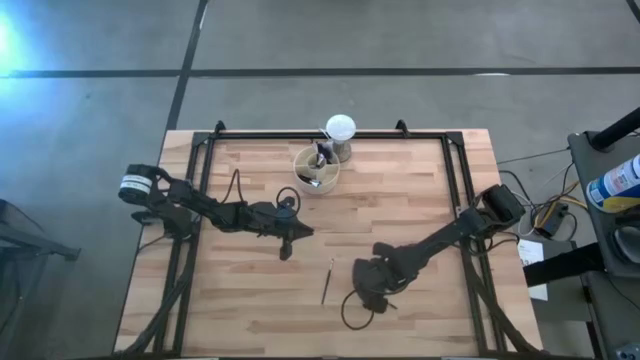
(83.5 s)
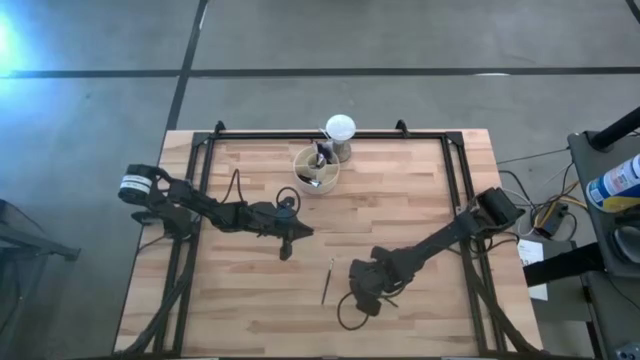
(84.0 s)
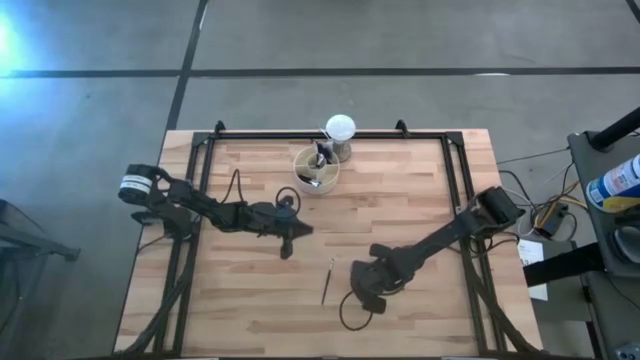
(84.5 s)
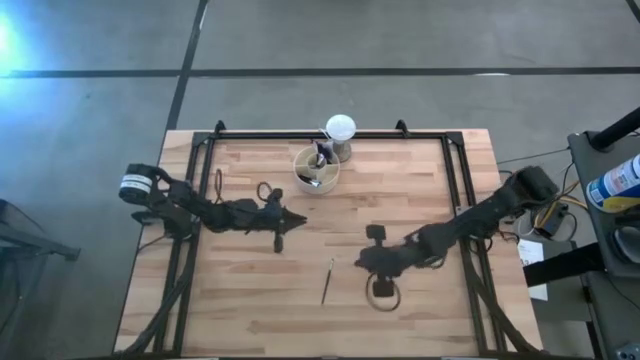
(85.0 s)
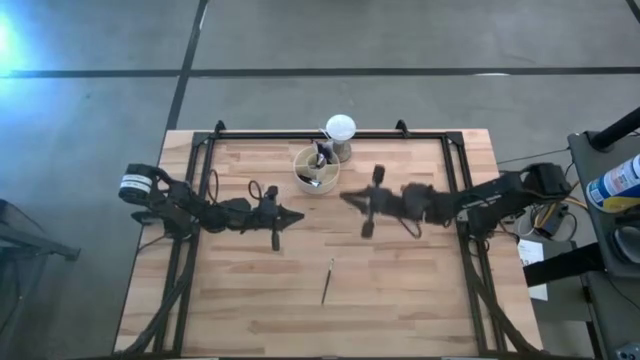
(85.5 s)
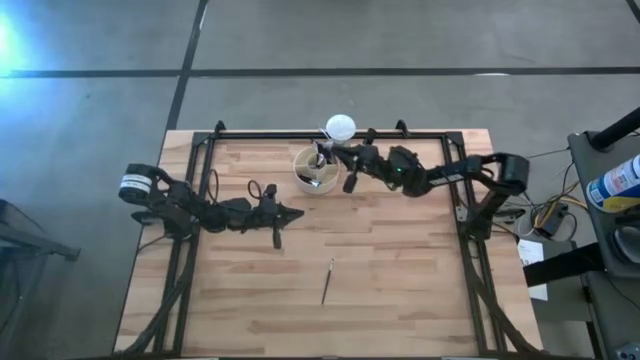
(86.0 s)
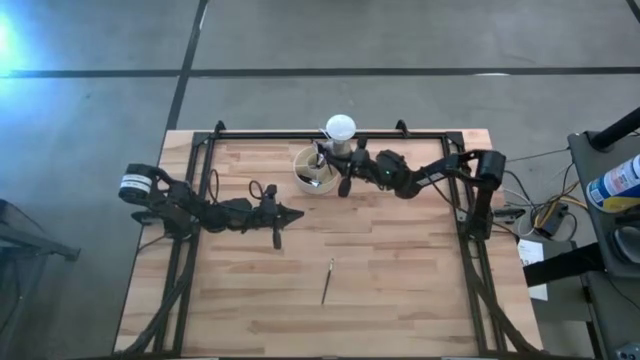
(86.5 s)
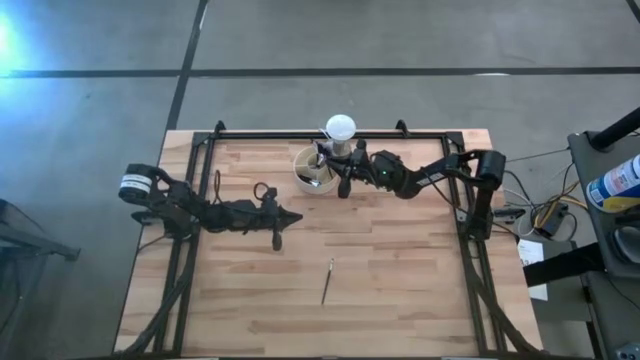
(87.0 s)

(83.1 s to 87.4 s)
Task: Put items in baskets/containers
Put the black liner brush into the white organizer

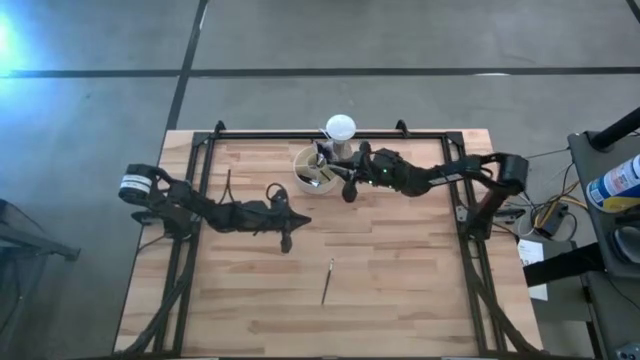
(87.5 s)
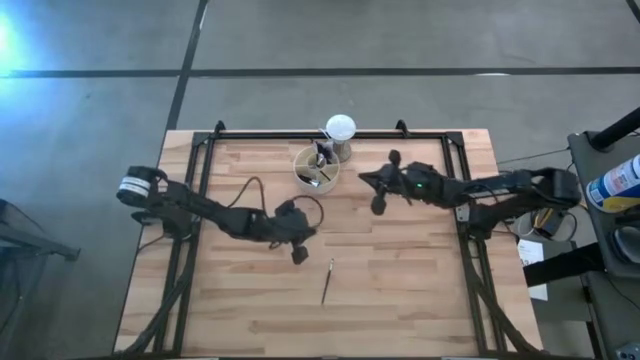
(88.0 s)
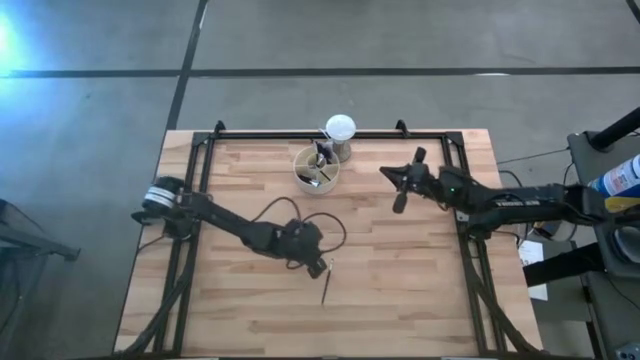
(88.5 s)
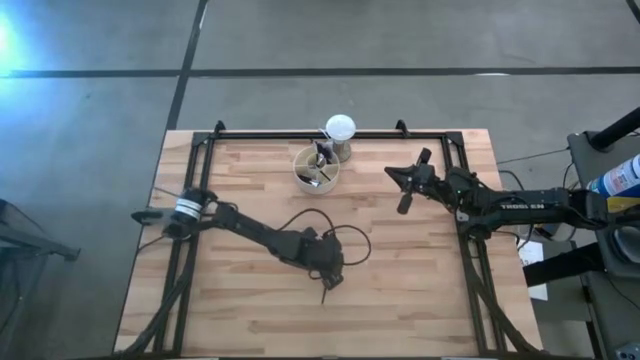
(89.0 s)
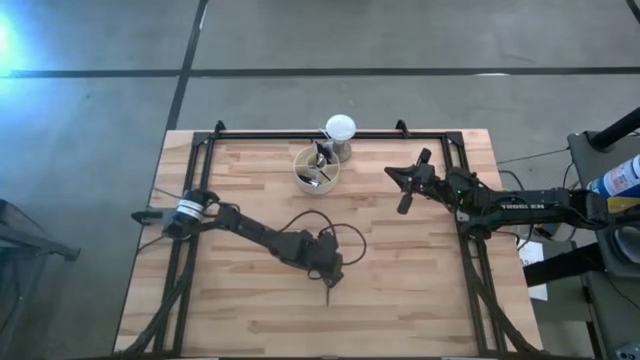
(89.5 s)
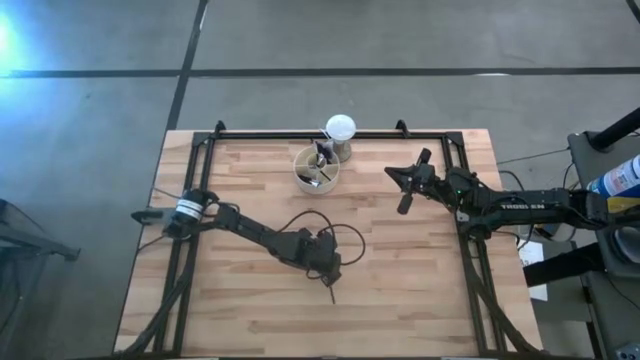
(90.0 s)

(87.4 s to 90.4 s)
Put the black eyeshadow brush into the white organizer

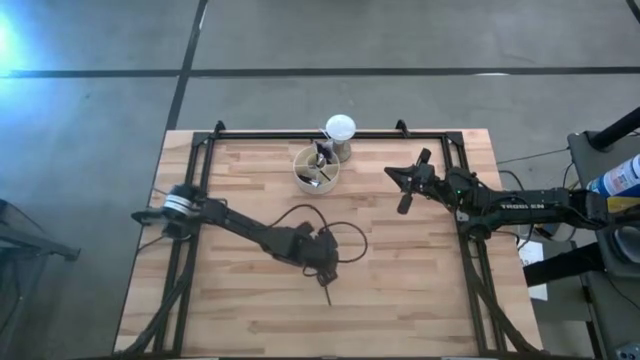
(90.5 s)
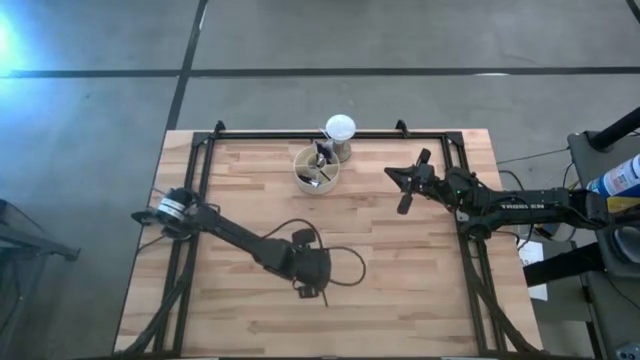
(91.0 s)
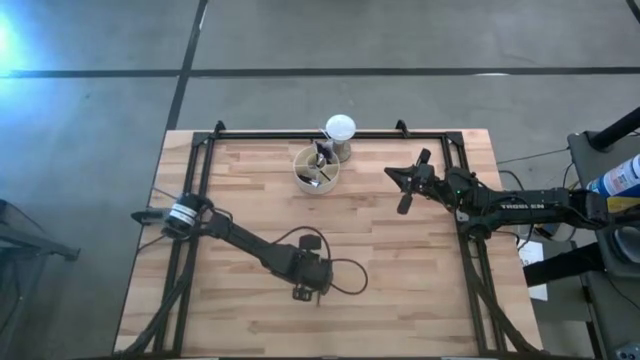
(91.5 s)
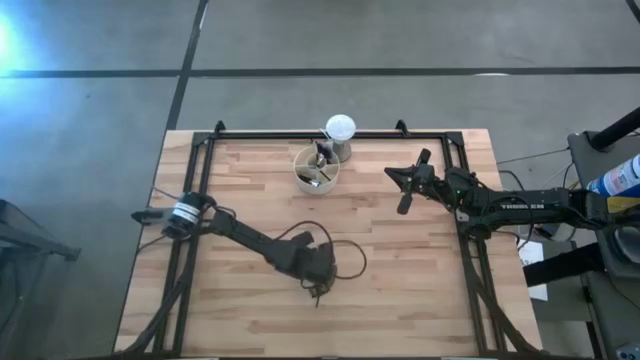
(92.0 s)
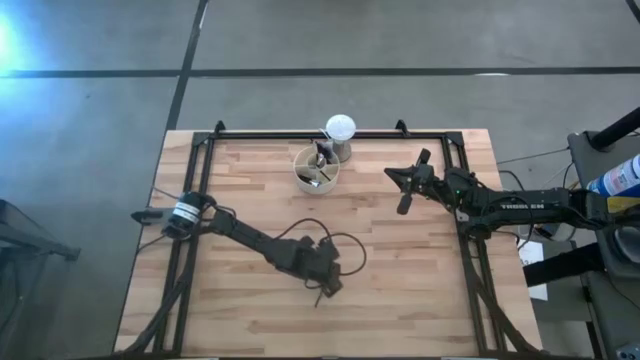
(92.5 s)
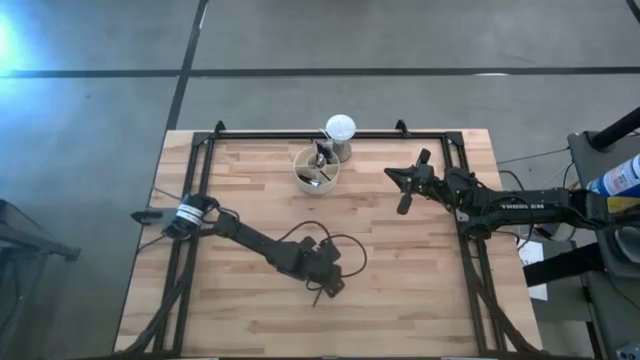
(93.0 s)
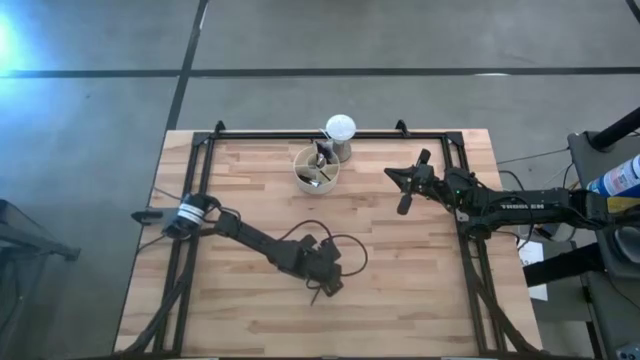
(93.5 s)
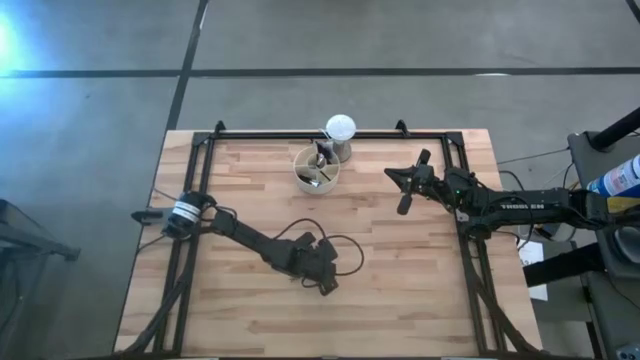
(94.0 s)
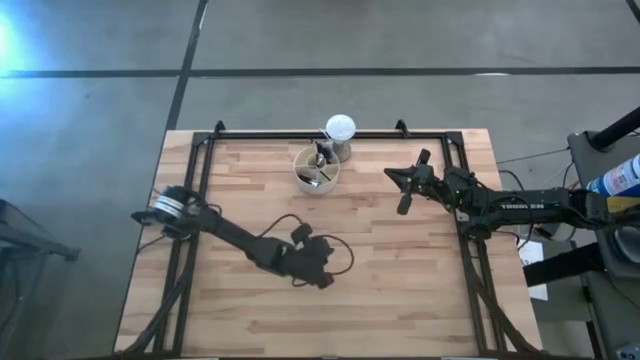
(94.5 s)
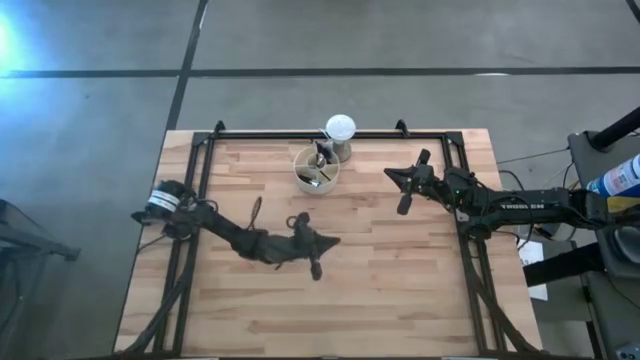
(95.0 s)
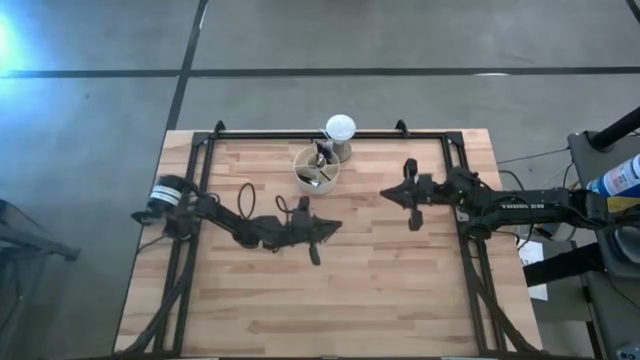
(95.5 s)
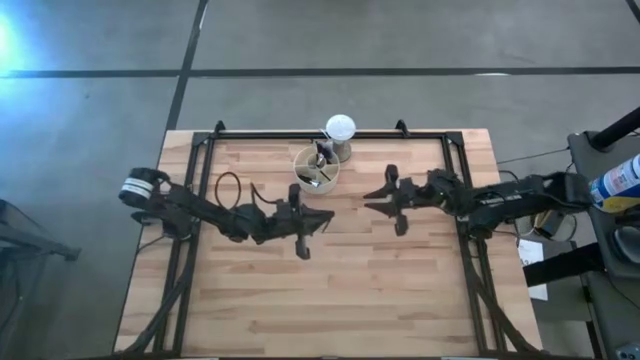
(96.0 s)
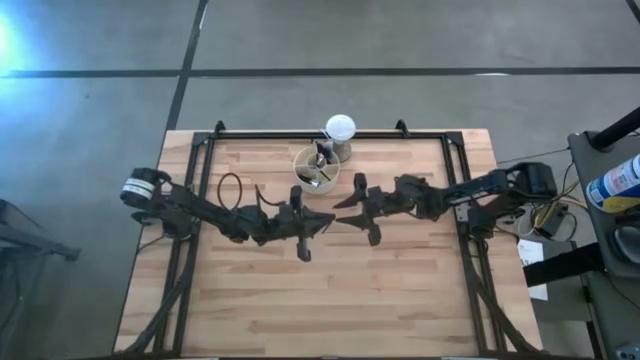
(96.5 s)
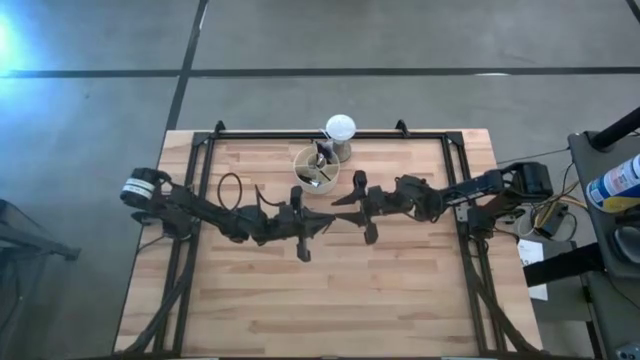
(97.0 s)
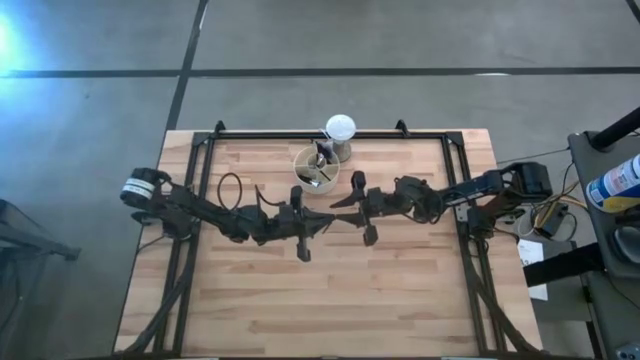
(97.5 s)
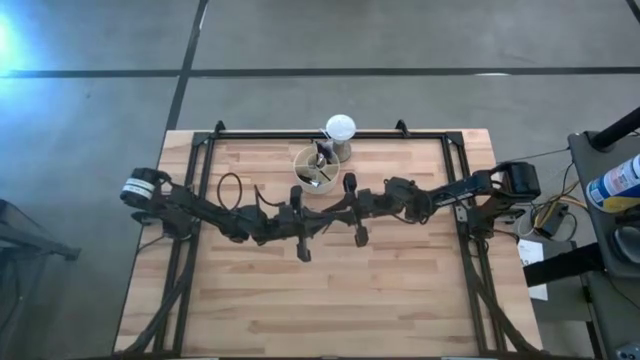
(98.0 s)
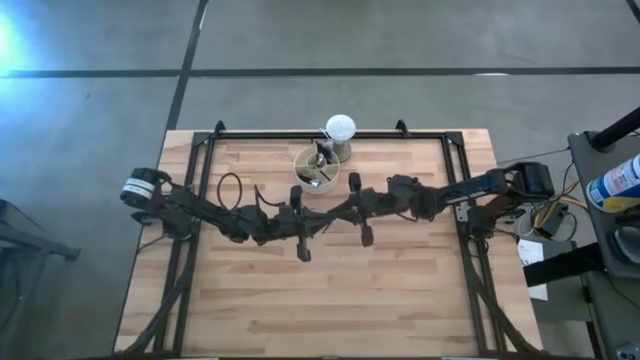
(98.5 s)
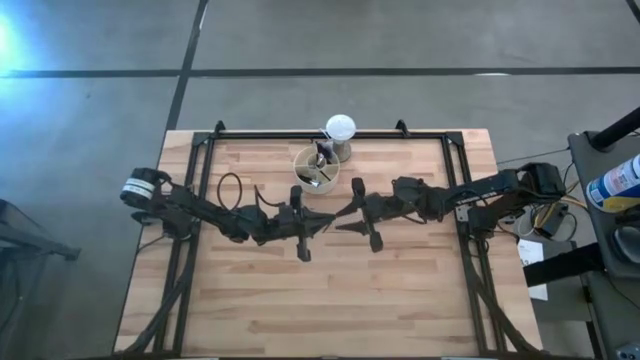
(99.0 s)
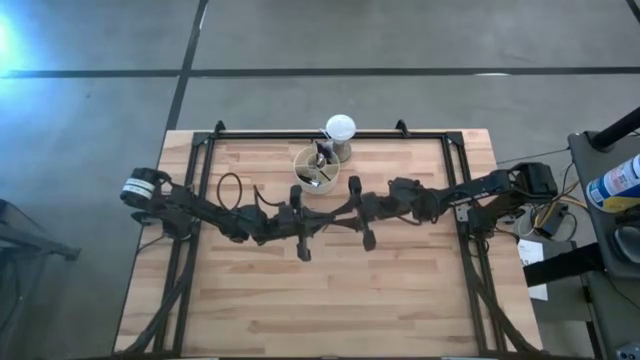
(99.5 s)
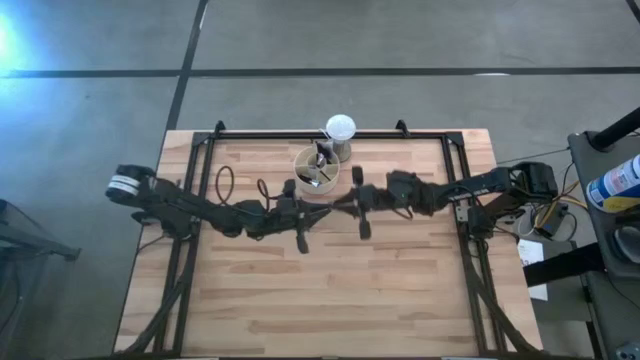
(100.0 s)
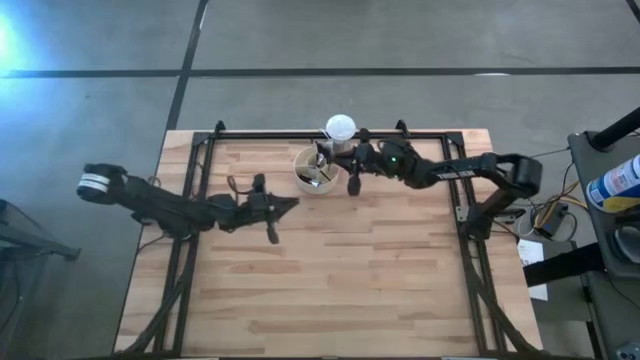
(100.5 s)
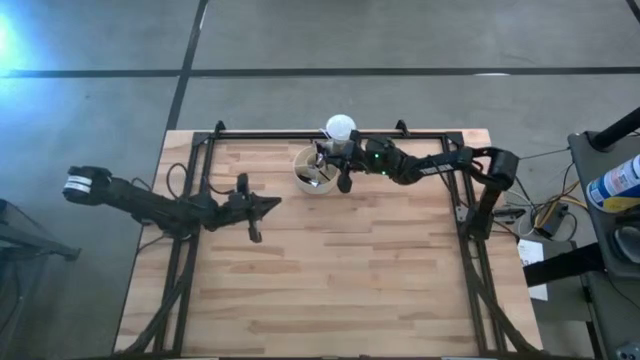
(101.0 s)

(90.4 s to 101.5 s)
Put the black eyeshadow brush into the white organizer

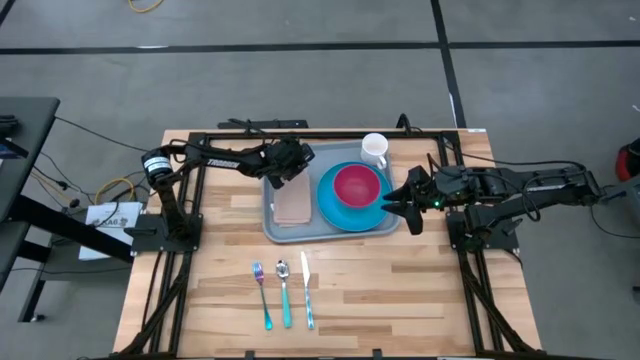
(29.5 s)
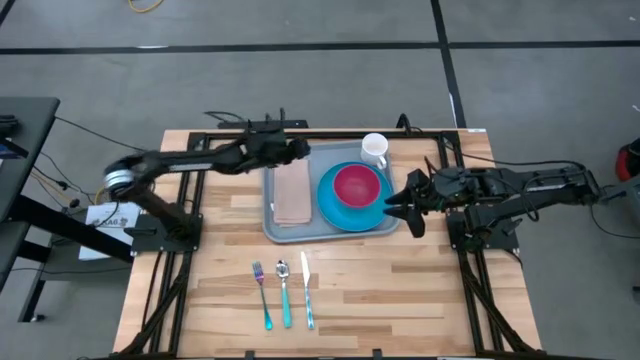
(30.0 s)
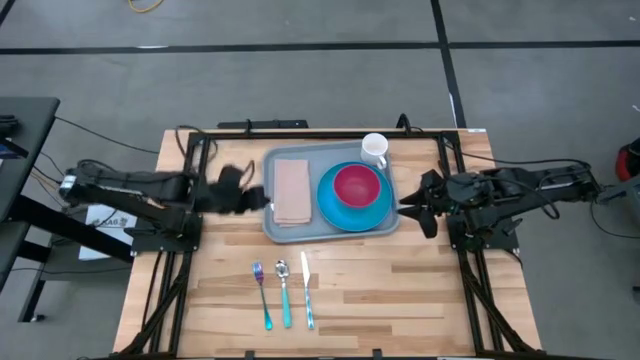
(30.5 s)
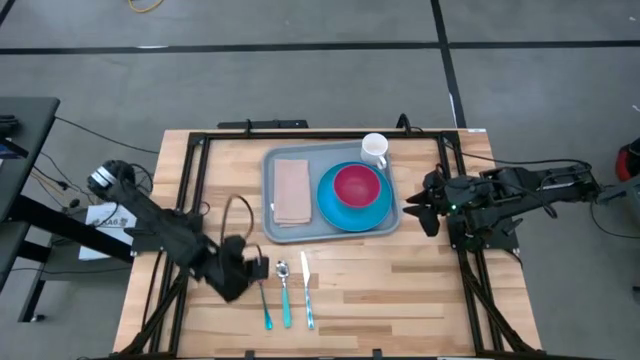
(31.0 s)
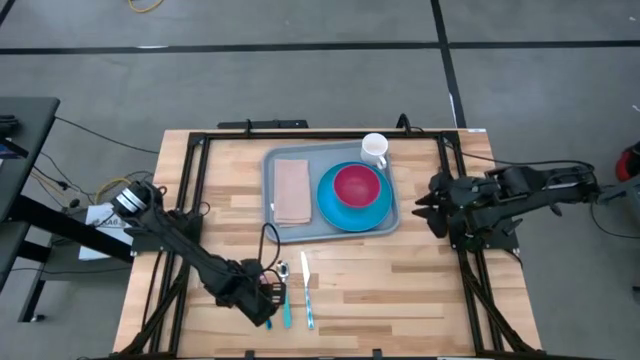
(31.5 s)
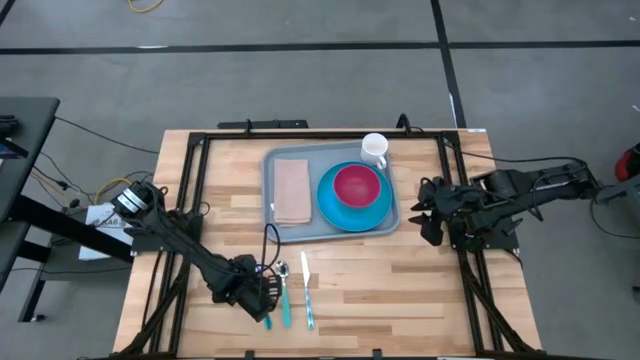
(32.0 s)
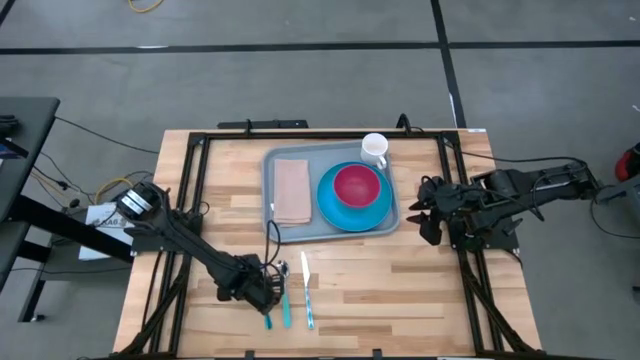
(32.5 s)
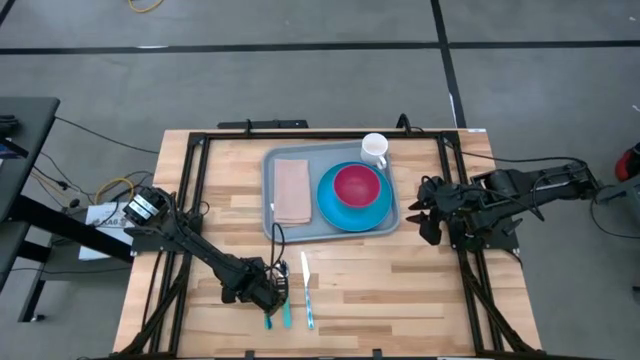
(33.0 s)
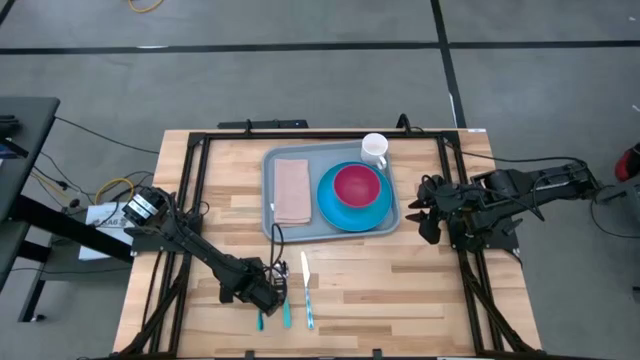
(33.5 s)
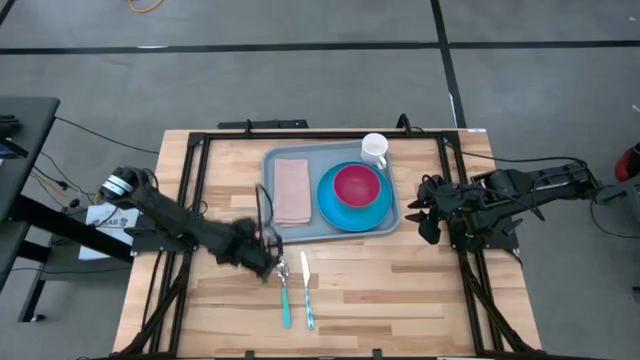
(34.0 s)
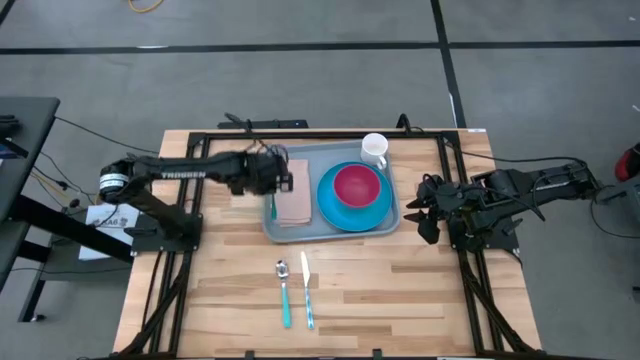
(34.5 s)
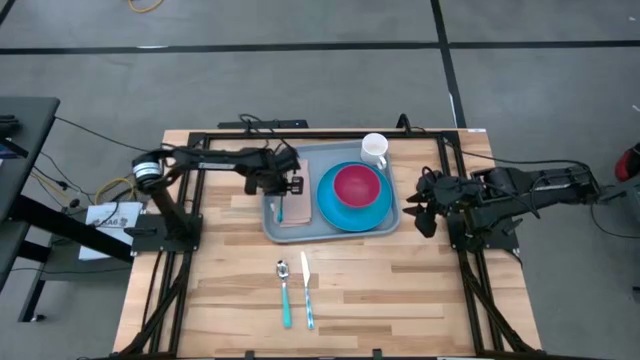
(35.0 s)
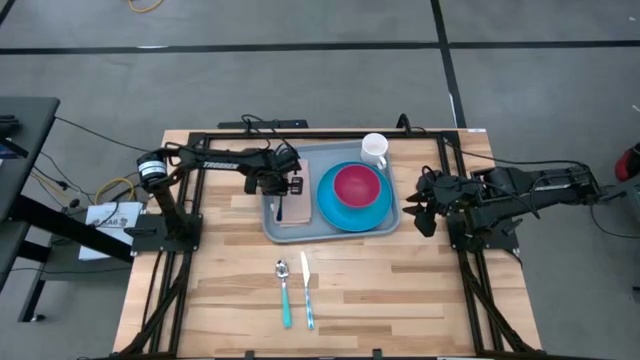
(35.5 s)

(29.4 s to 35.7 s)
Task: Set up tray
Put the blue fork on the brown napkin on the blue tray
